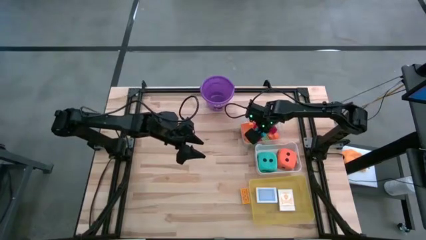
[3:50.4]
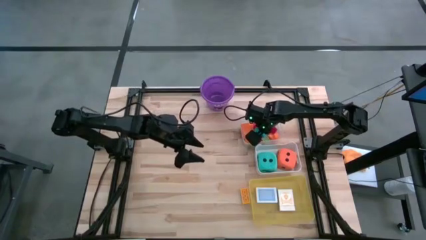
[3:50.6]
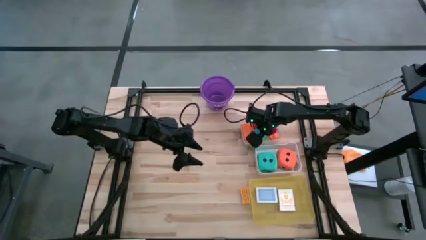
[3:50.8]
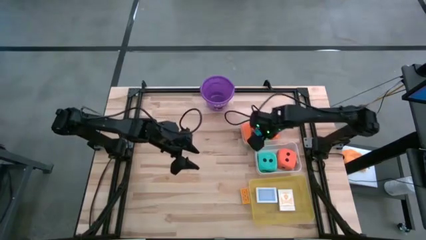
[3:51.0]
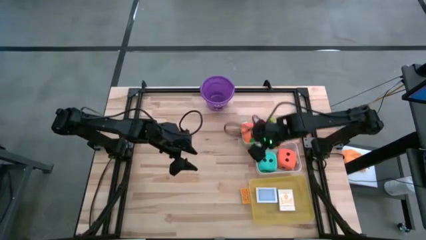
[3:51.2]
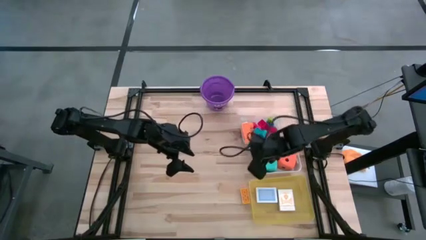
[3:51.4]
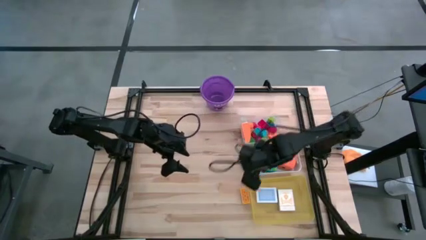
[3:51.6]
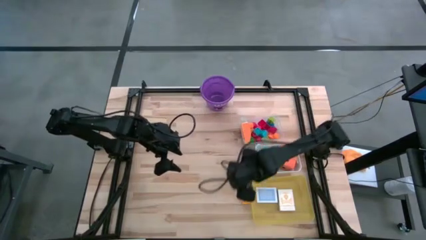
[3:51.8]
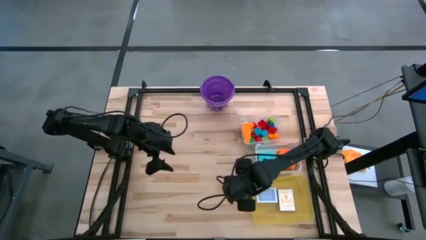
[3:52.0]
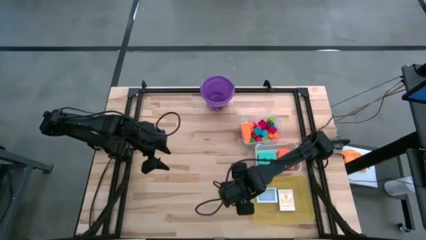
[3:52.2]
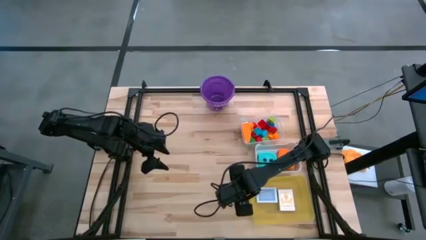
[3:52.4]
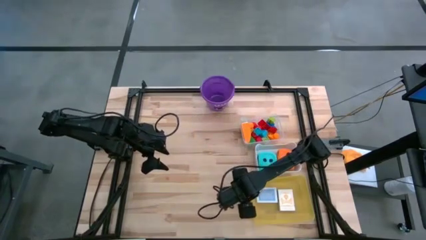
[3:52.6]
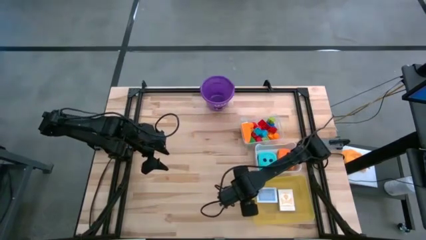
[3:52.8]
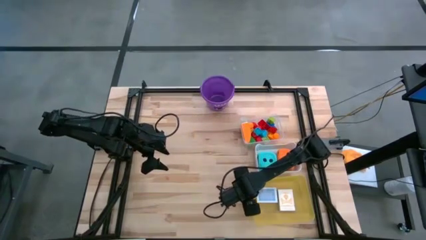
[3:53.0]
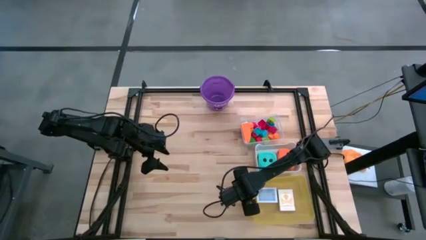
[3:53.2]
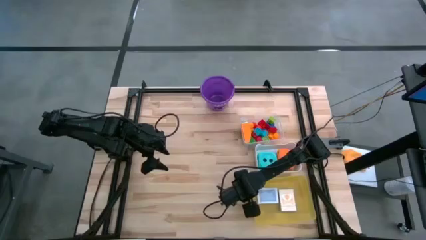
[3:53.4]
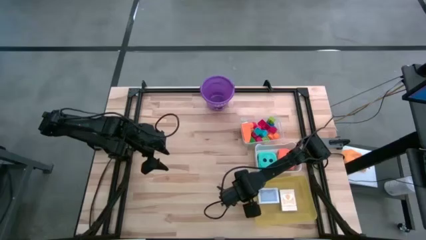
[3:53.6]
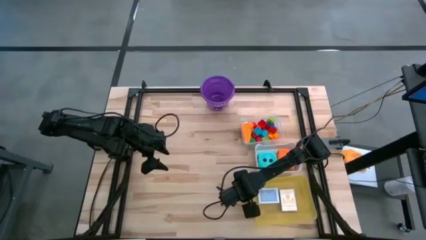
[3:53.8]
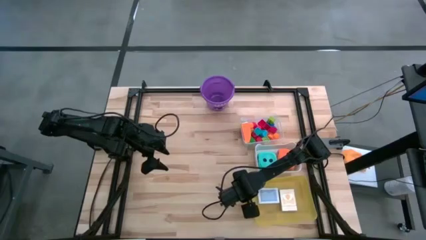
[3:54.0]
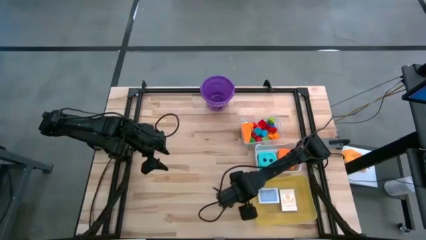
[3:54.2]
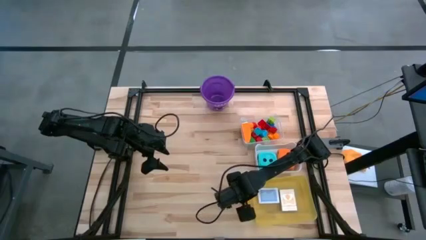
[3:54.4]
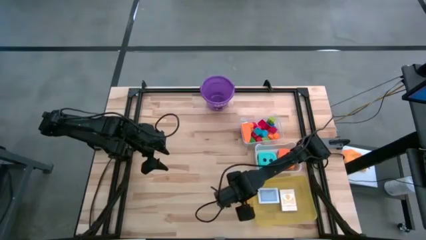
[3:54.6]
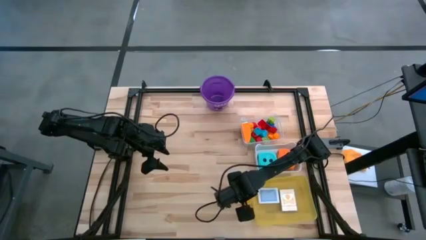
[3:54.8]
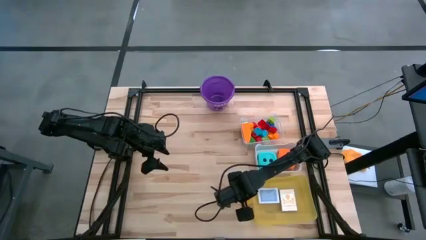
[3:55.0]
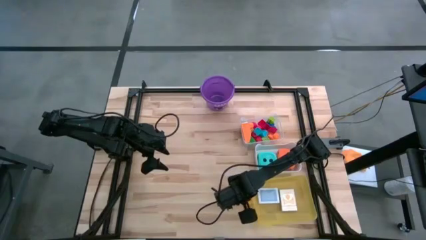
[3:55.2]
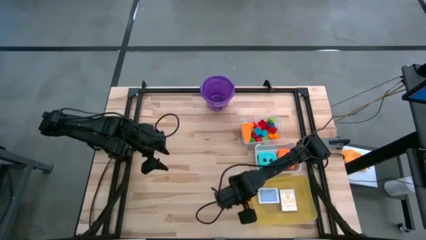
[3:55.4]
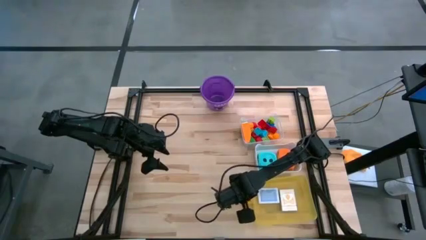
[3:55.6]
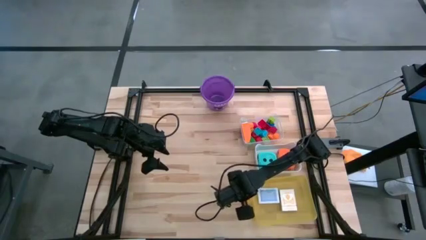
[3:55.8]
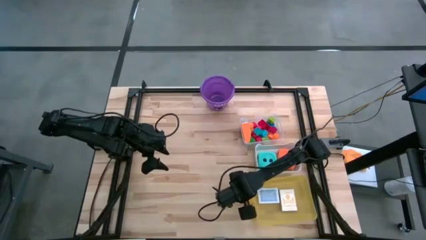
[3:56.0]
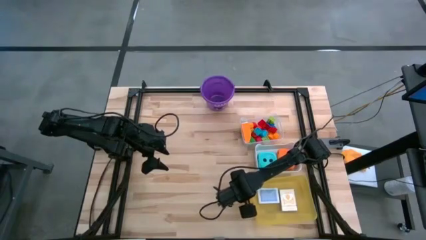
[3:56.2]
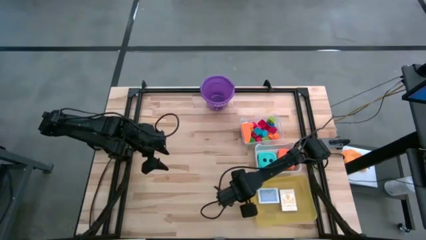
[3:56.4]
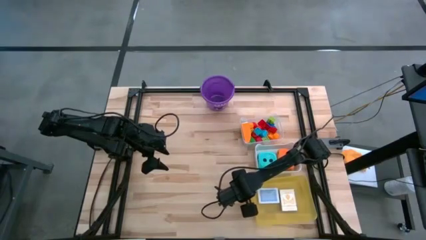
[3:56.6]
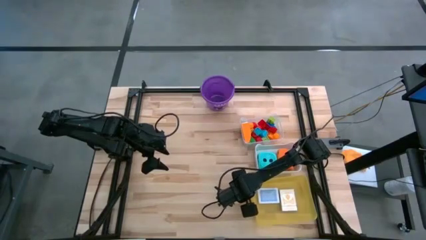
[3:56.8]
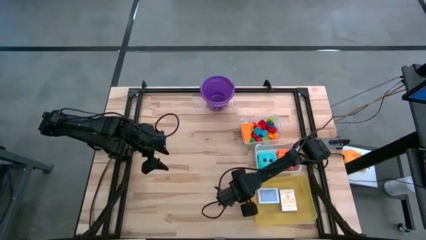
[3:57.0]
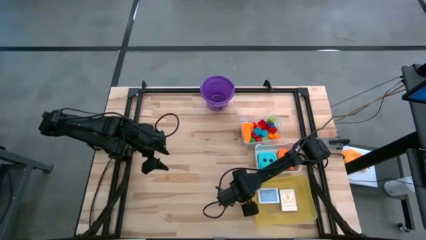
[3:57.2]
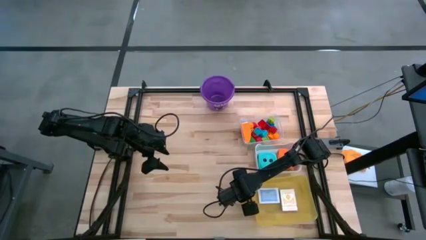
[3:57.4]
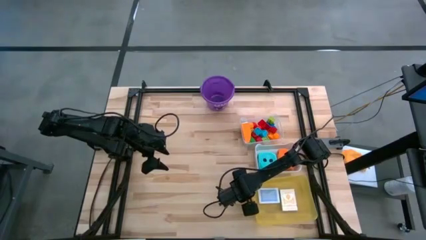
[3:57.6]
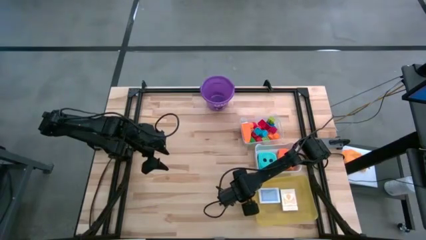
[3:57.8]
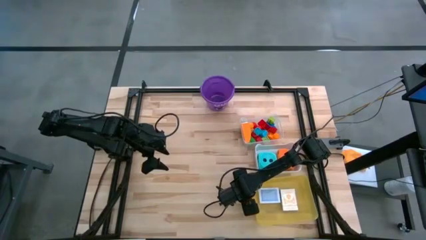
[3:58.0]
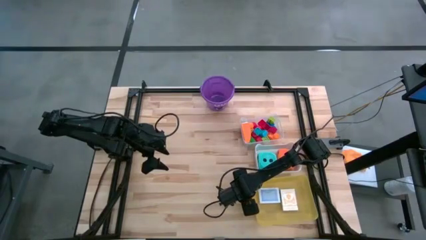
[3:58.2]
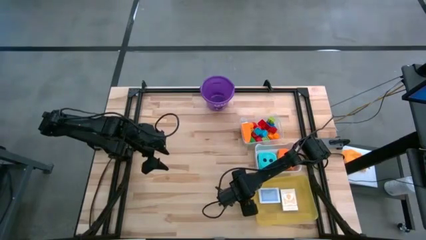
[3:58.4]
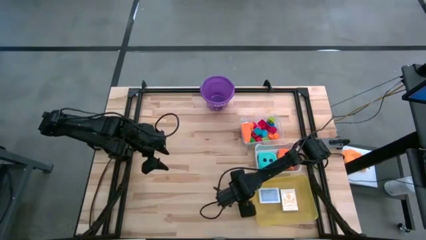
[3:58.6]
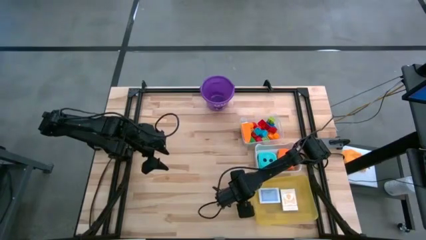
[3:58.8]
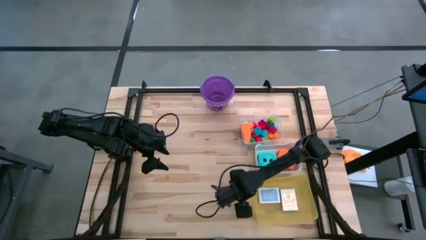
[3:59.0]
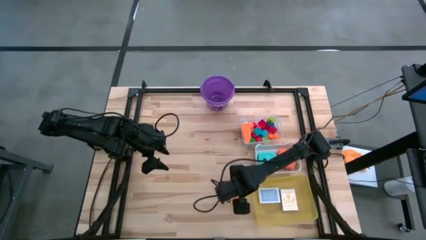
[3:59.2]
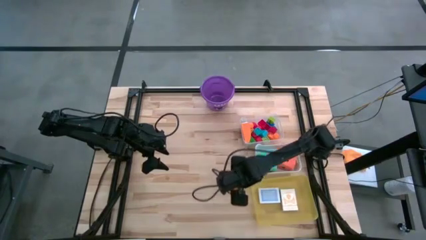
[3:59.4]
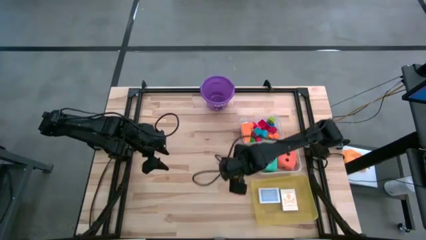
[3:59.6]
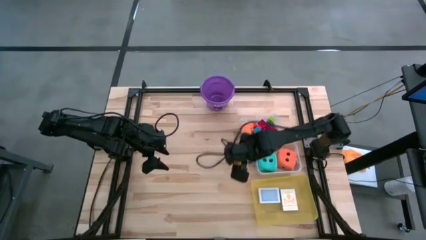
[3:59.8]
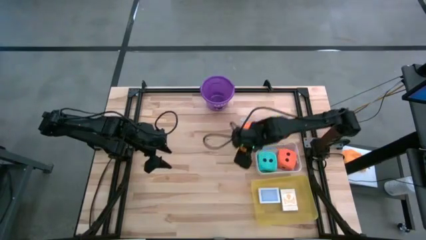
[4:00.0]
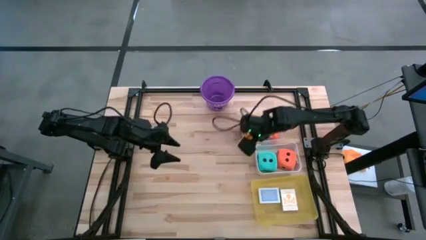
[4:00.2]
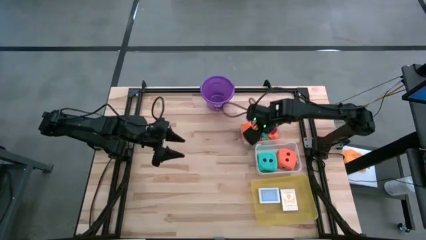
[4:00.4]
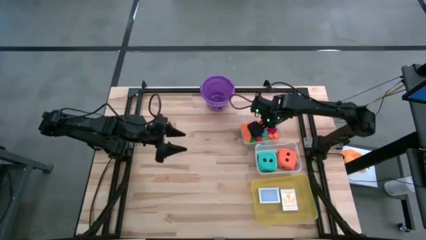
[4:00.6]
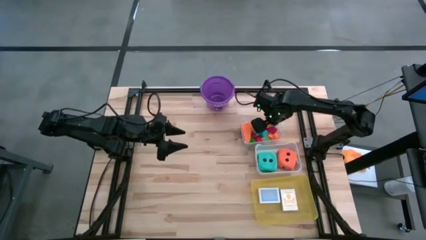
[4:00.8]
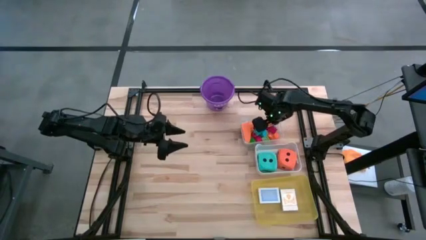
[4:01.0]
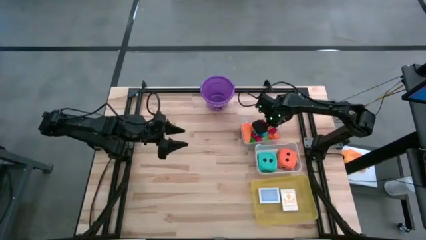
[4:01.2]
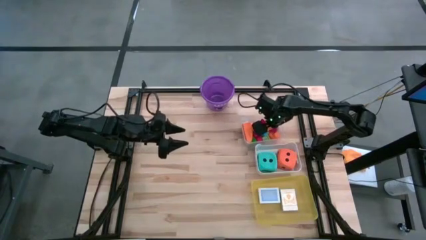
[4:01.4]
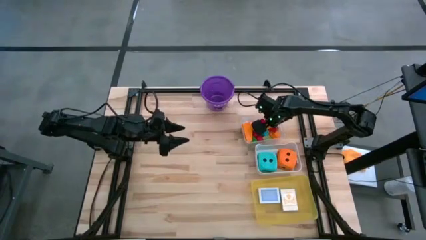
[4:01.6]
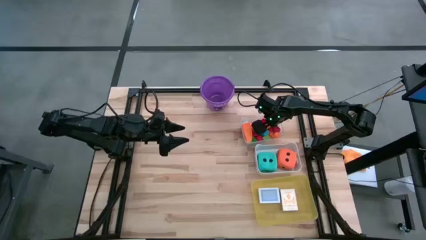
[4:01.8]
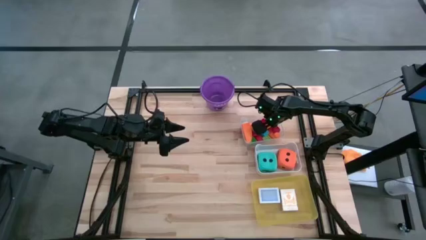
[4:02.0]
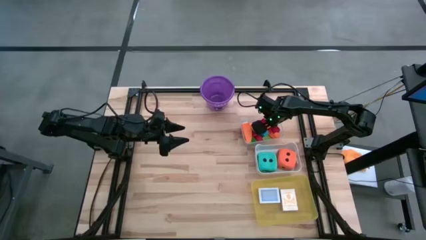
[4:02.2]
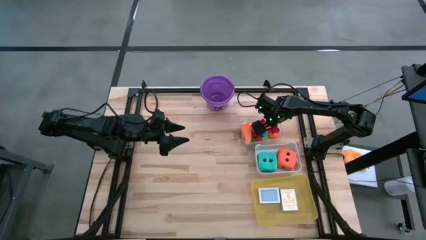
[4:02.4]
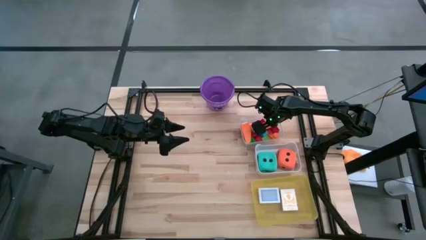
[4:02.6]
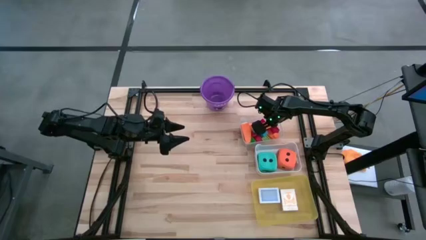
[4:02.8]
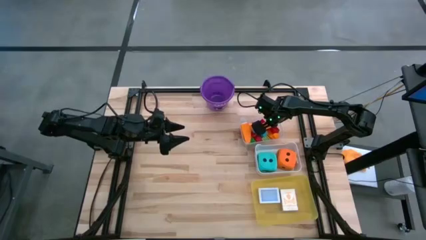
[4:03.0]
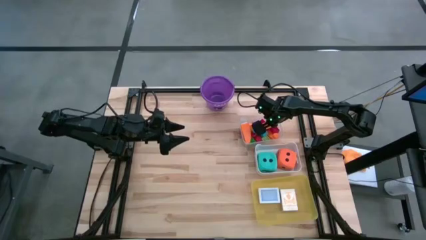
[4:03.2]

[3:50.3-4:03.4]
Task: Pick & Place Toys
Put the yellow game piece into the transparent bin

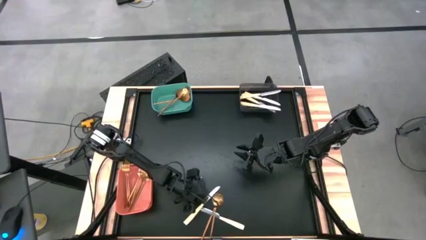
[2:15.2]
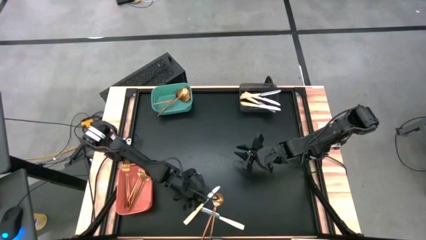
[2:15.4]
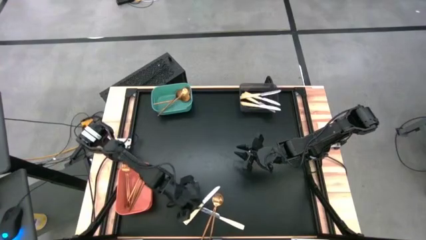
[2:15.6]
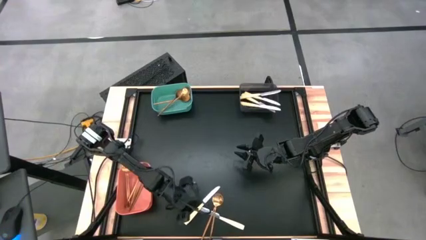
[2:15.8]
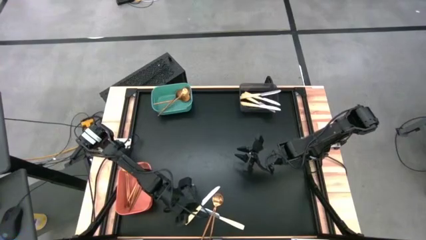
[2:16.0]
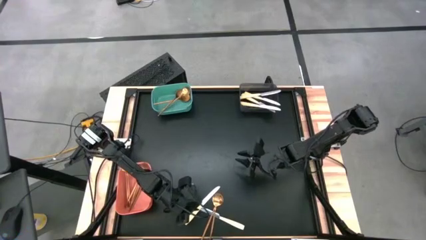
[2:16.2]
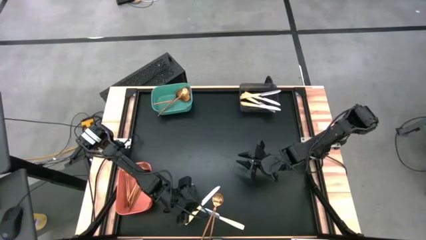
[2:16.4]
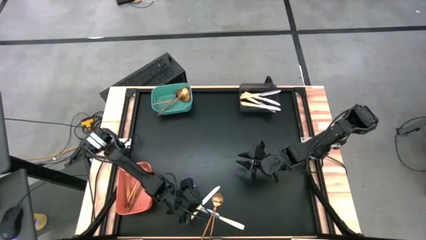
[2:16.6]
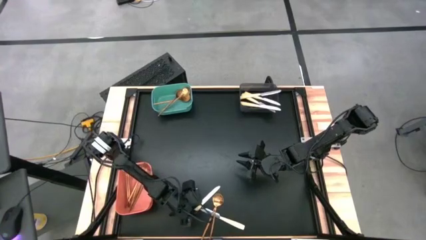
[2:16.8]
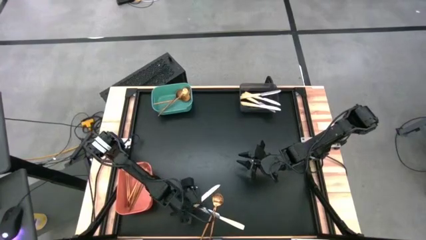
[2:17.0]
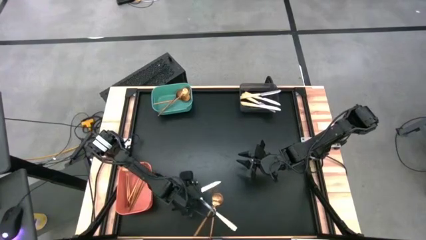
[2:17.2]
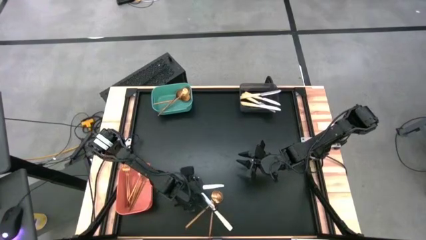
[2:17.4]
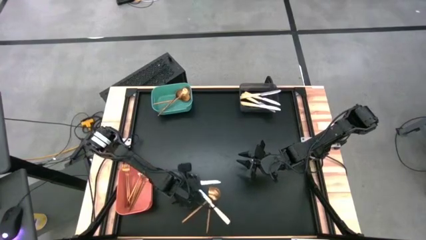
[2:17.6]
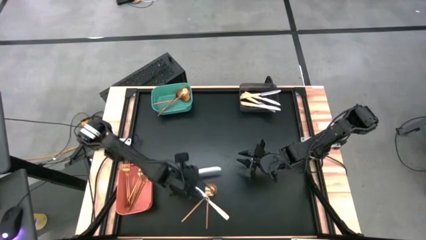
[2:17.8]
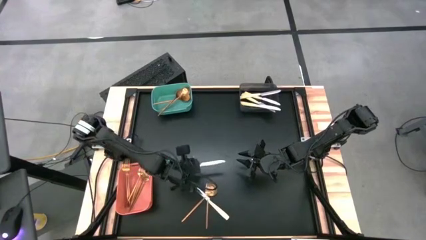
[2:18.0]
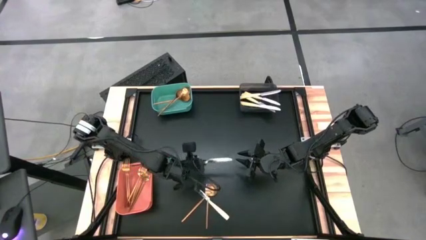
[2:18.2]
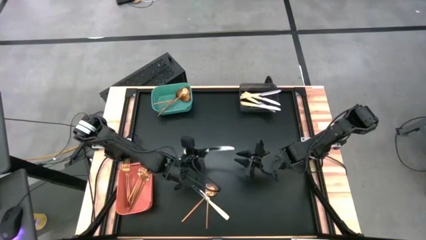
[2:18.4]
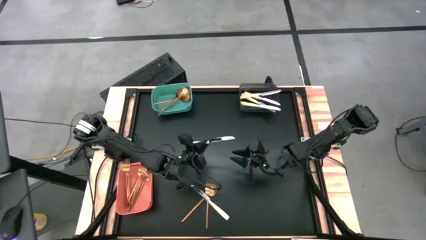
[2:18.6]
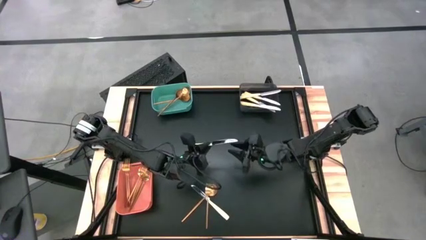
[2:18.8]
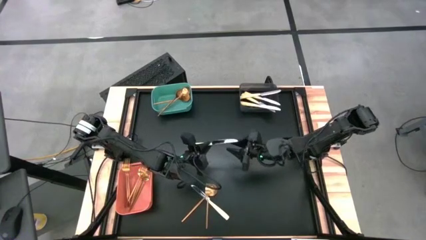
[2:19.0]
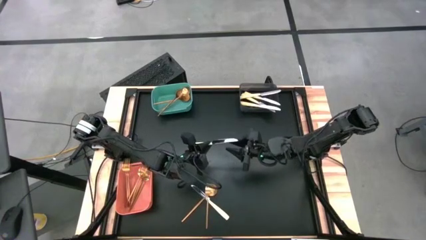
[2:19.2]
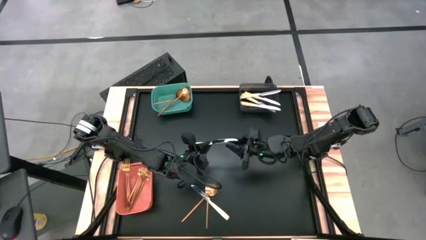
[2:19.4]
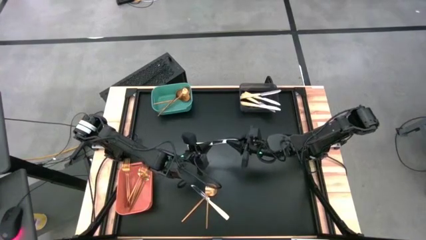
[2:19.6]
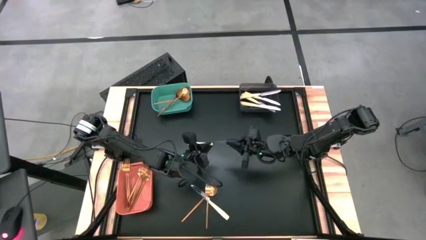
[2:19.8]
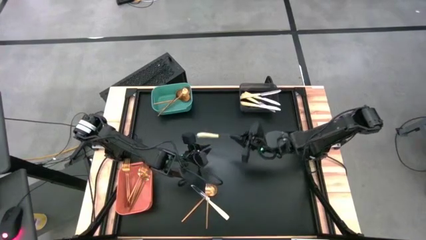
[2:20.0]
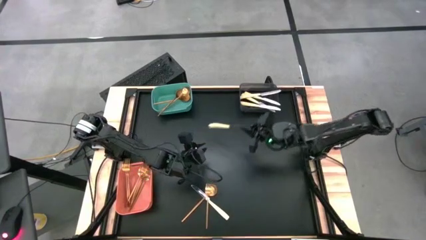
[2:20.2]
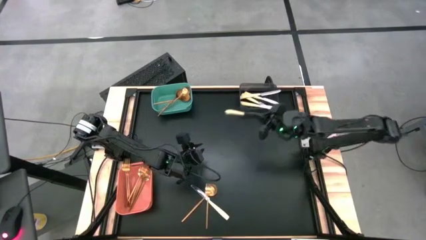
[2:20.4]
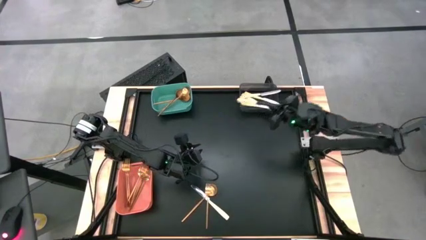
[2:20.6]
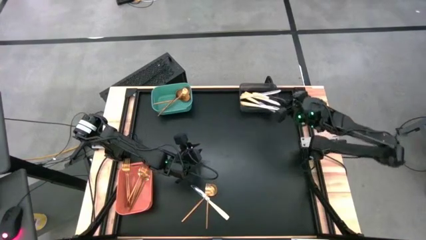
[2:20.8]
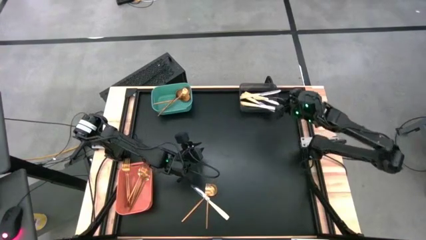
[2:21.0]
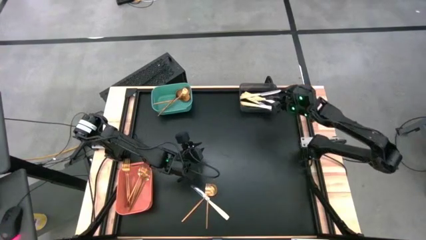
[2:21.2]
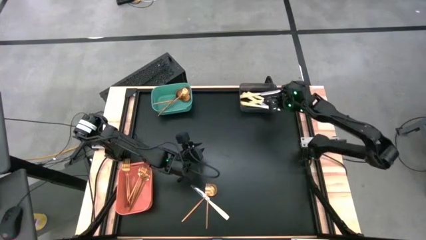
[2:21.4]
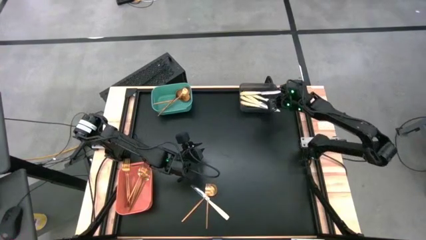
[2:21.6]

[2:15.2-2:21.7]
Task: Sort silverware by color (type)
Put the yellow knife into the black bin
